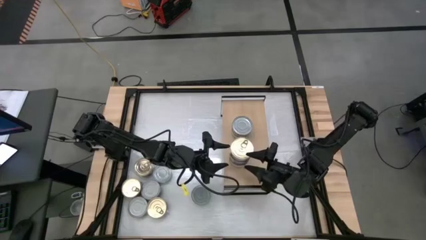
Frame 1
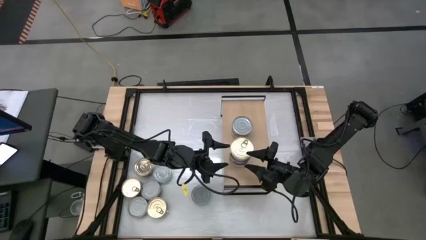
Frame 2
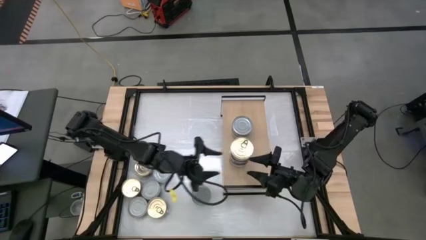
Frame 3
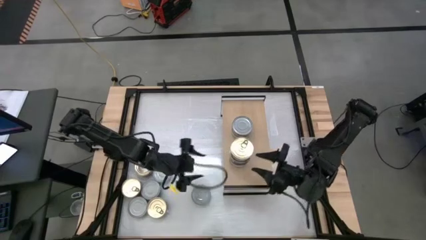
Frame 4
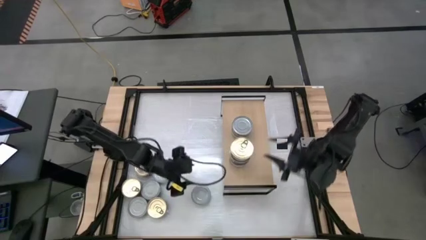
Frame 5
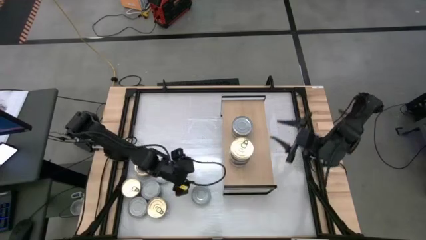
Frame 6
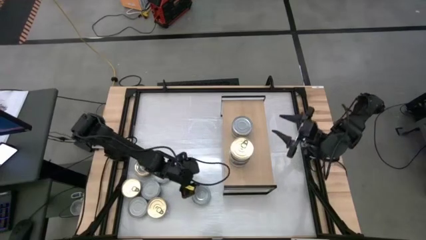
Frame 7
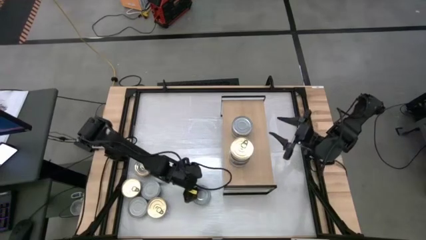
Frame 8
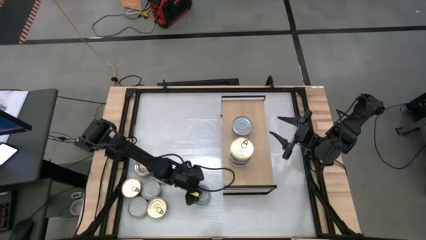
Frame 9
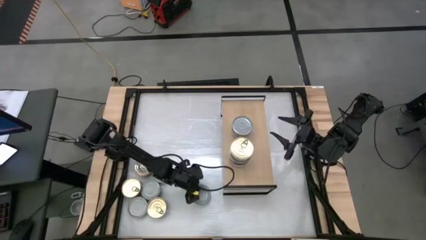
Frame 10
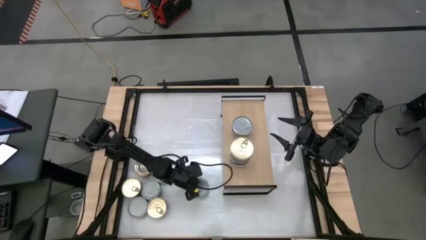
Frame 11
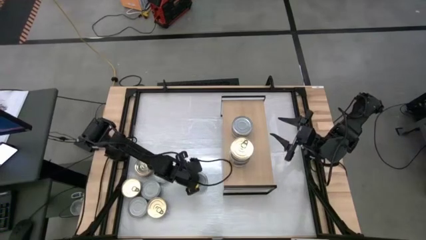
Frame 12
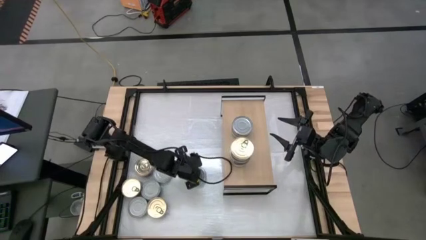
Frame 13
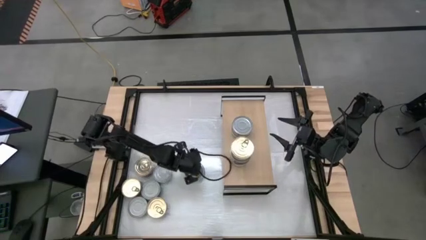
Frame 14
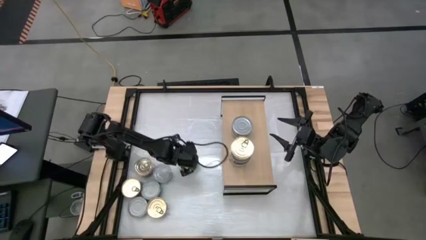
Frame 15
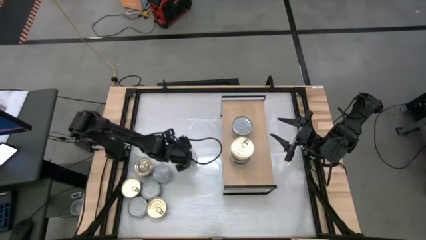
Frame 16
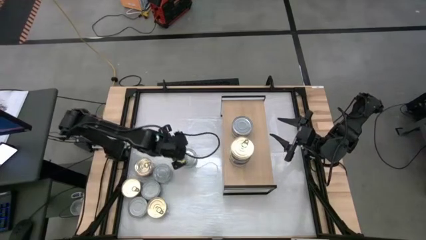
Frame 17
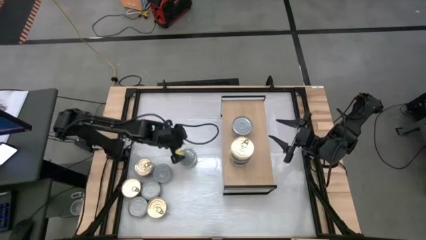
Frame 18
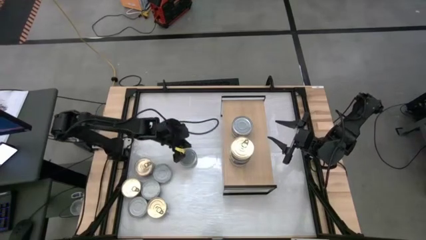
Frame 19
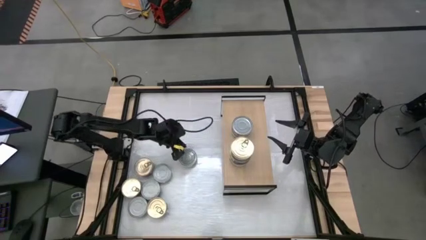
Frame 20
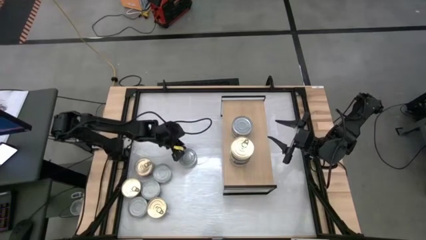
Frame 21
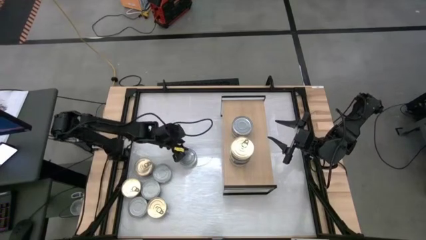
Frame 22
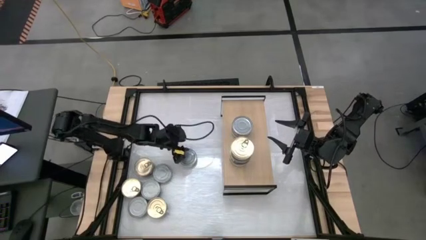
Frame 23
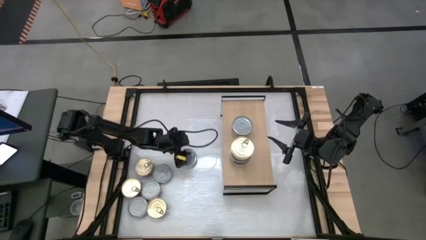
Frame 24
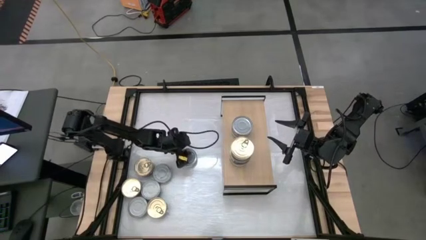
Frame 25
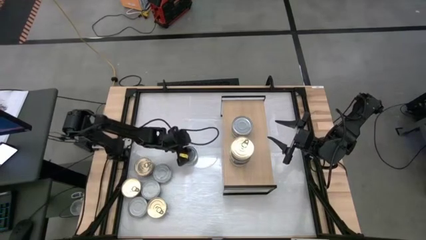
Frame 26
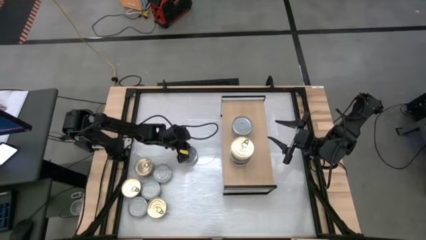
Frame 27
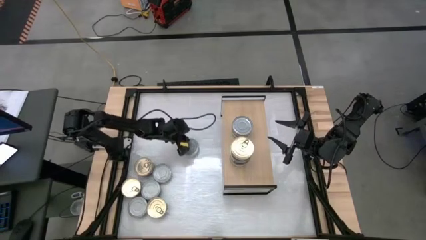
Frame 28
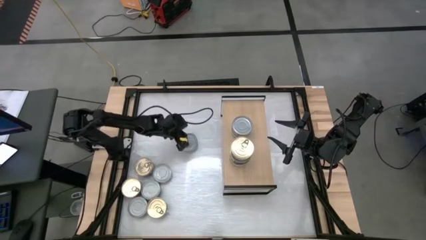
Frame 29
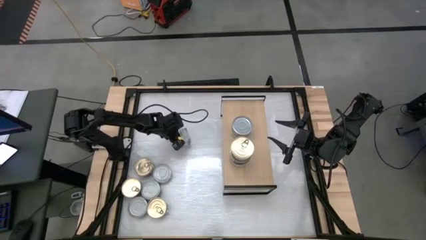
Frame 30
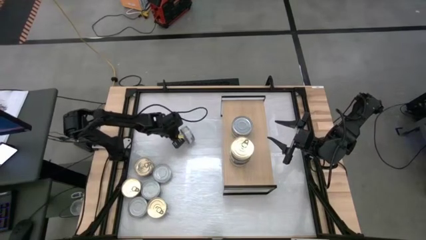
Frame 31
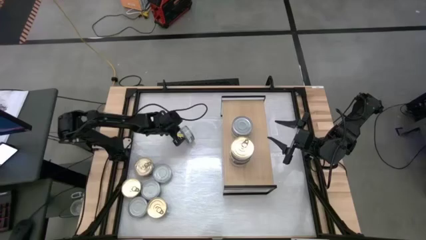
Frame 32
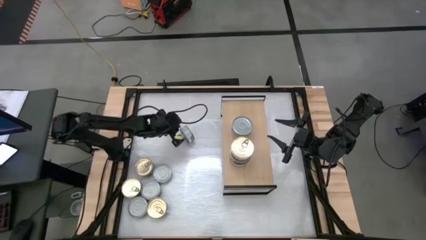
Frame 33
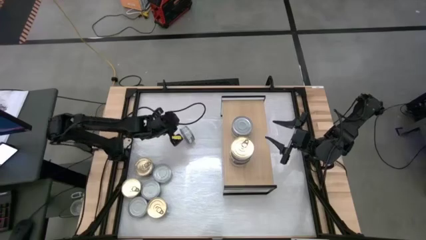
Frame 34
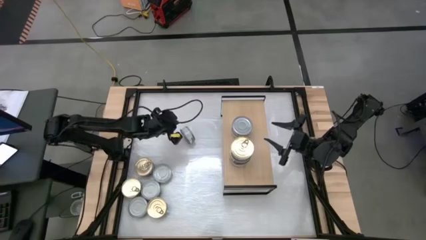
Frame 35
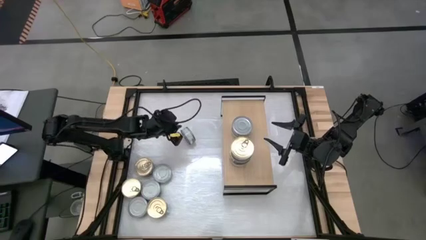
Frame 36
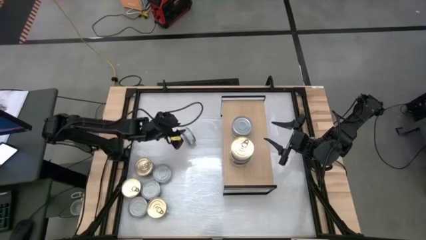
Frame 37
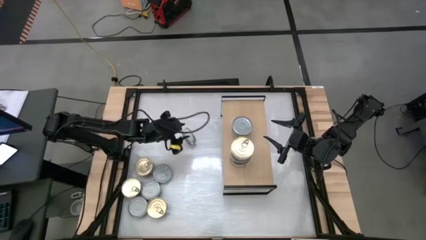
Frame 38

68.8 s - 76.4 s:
Task: Stack canned seafood by type on shelf
Stack the green tuna can on top of the green tuna can

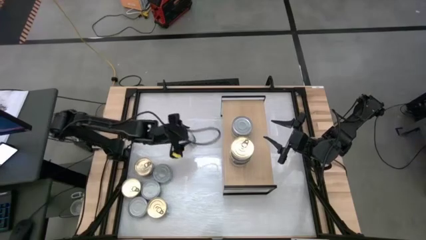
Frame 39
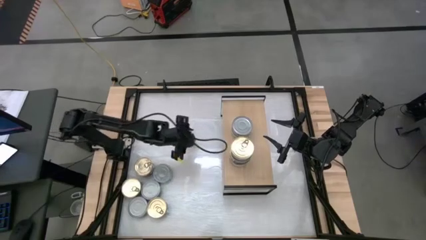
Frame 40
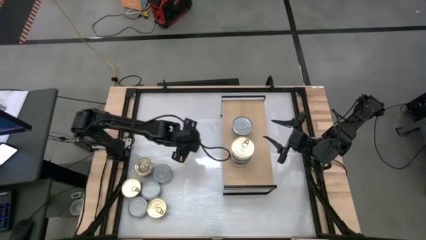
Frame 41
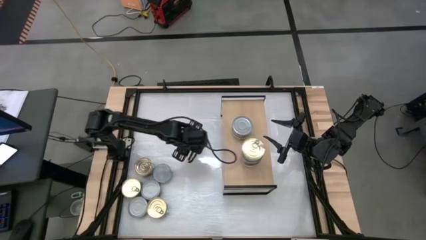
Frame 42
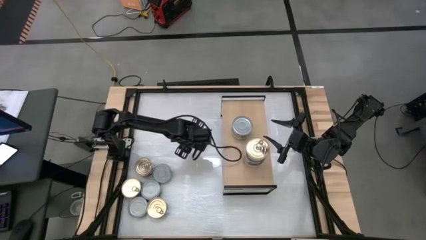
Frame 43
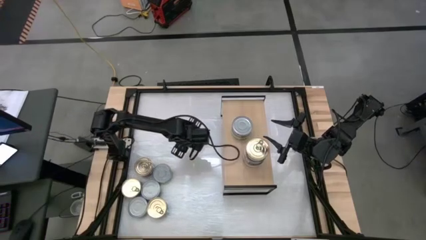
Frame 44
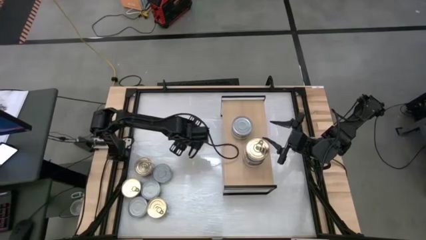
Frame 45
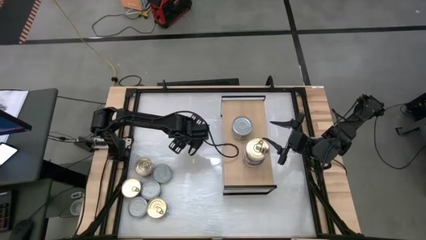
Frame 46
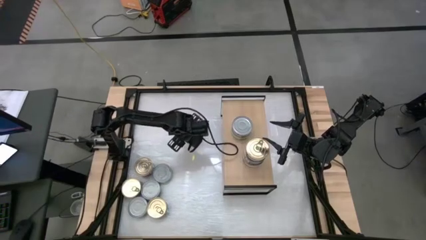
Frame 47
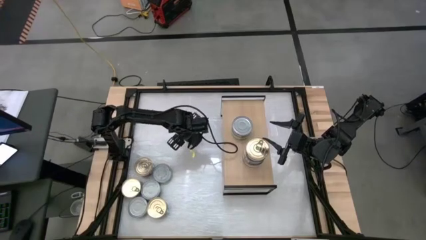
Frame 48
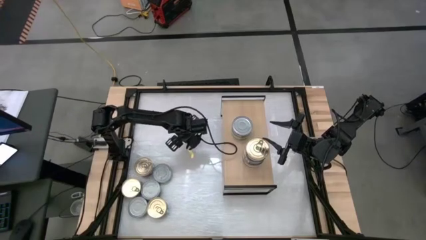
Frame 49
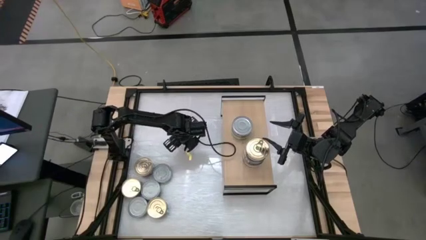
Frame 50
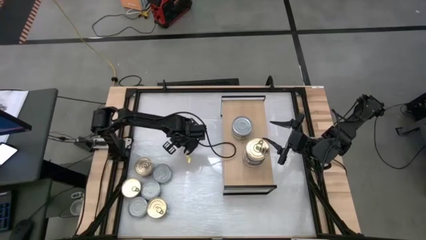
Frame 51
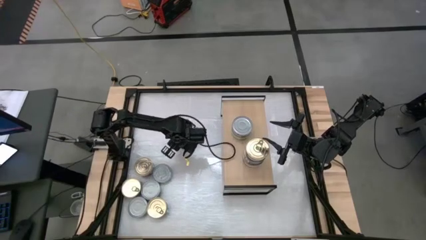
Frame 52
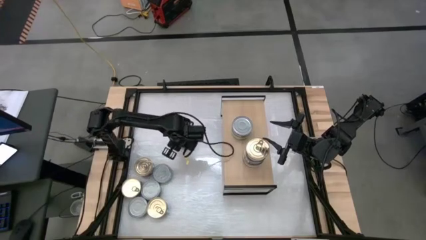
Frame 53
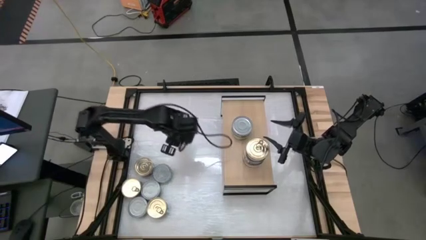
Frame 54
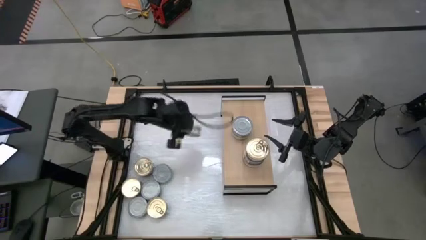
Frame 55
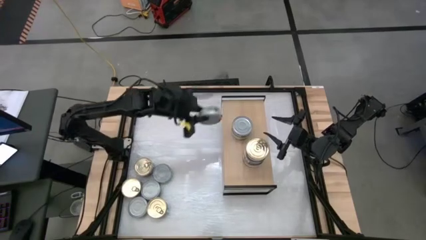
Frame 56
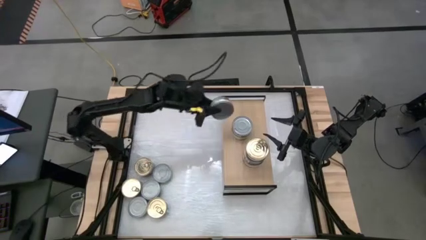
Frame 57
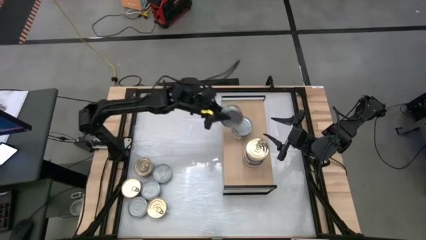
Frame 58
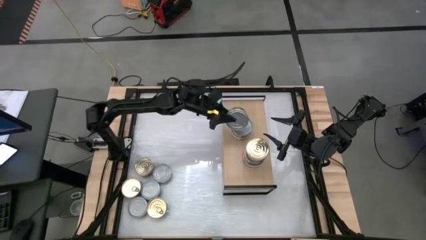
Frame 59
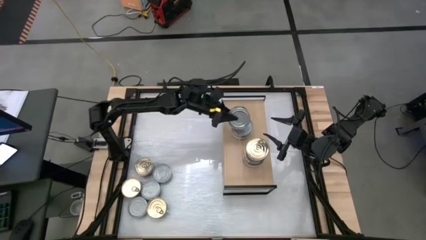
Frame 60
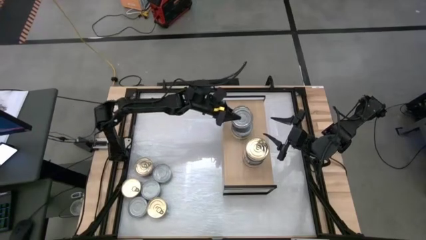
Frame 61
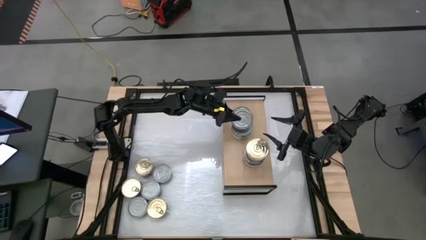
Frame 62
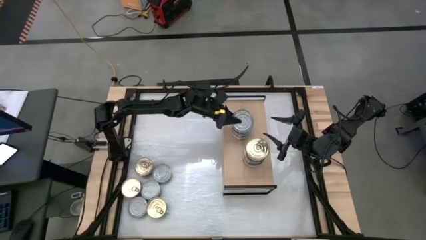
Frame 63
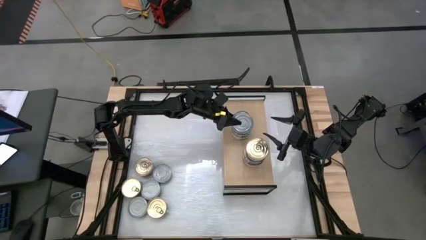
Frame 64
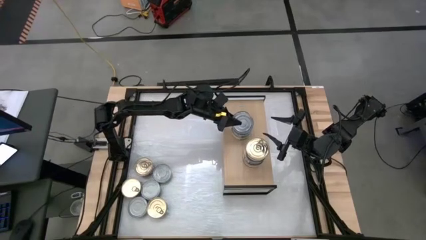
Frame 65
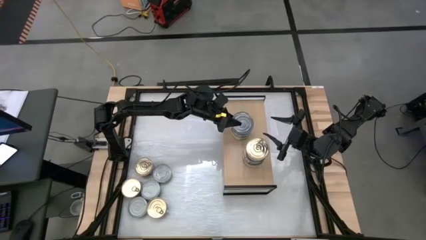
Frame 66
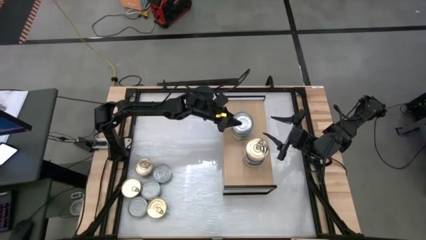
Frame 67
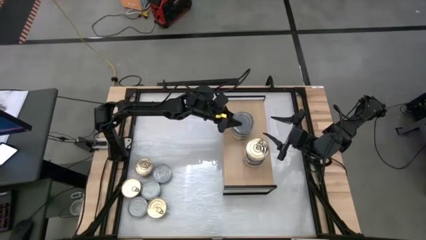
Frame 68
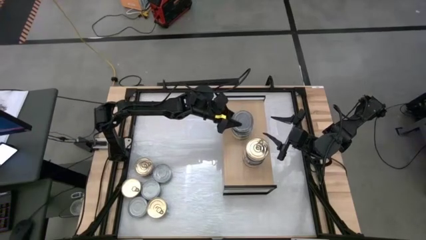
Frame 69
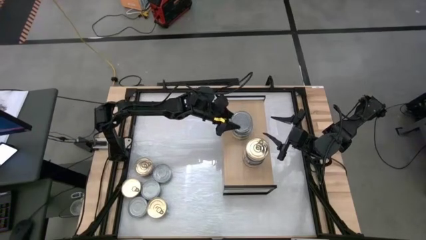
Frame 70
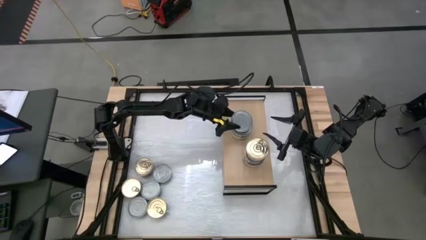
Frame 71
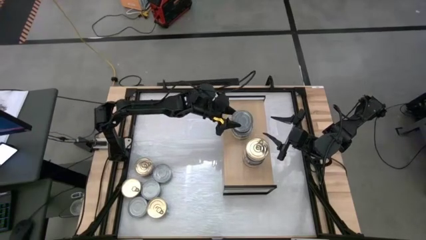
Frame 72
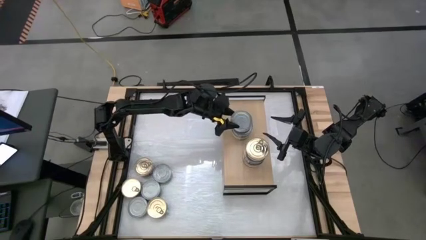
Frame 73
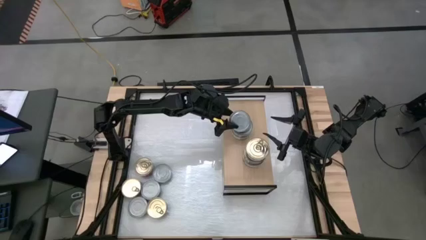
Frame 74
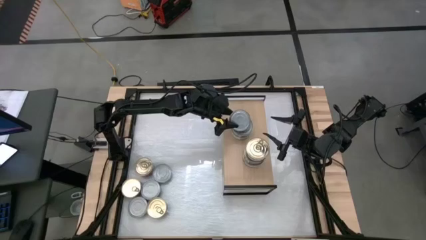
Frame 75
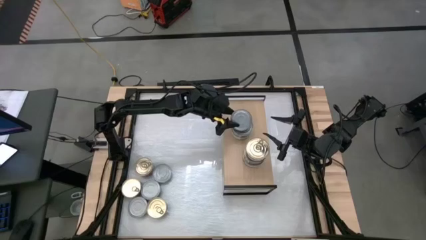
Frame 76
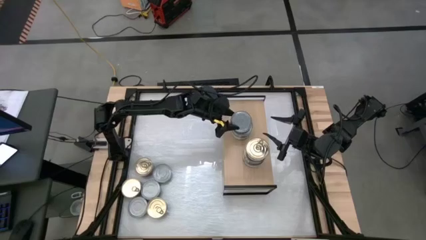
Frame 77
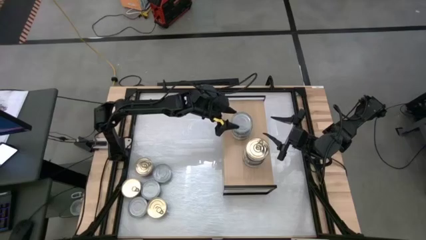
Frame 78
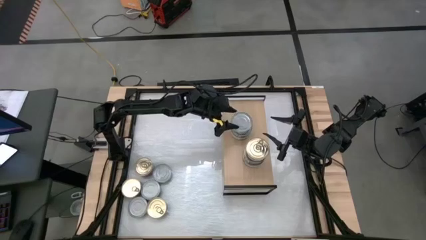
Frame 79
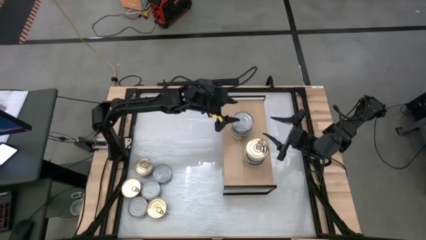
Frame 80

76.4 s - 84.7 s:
Stack the green tuna can on top of the green tuna can
